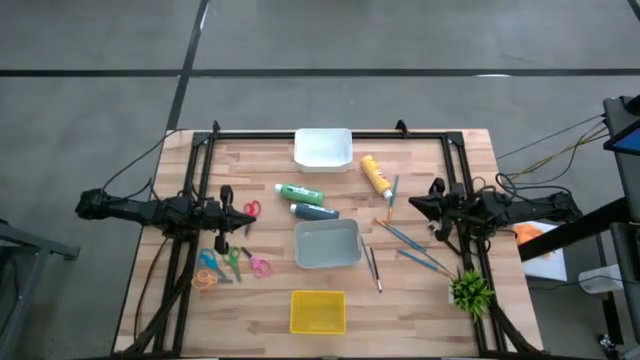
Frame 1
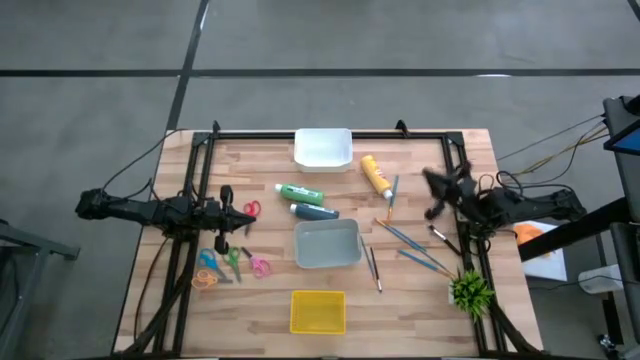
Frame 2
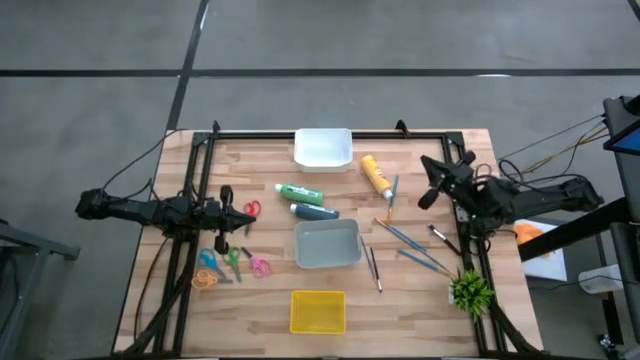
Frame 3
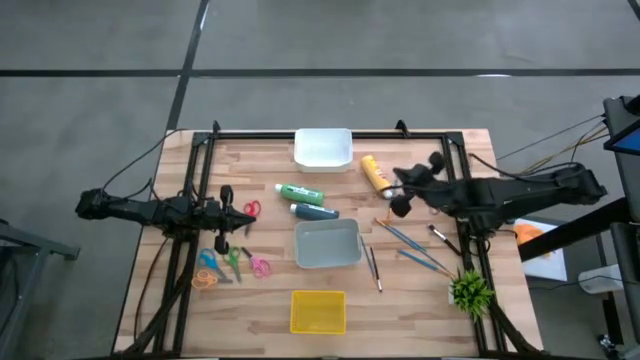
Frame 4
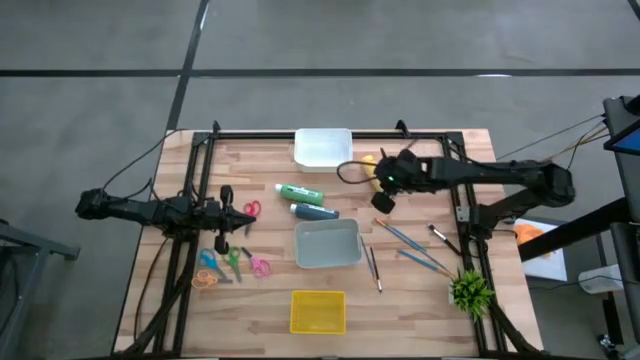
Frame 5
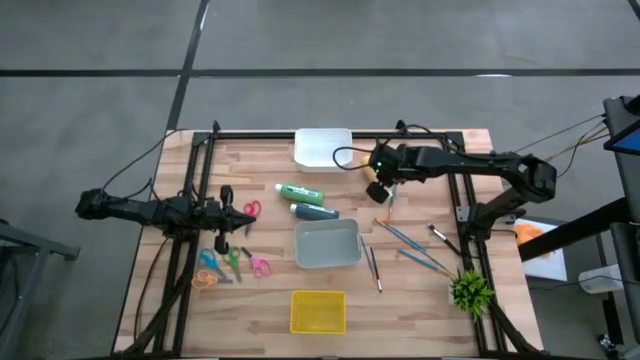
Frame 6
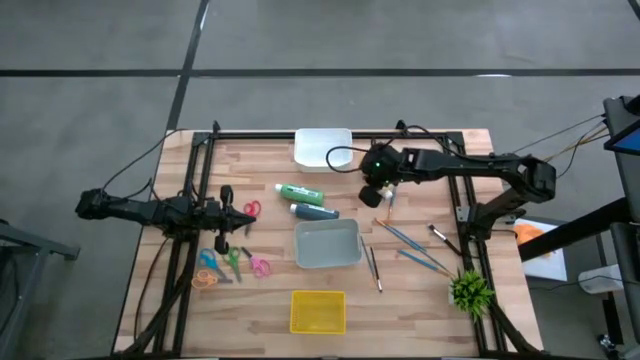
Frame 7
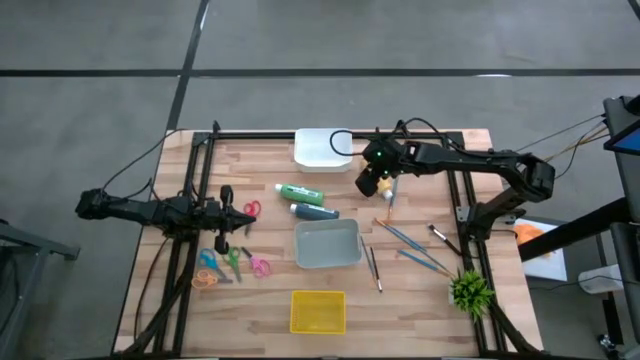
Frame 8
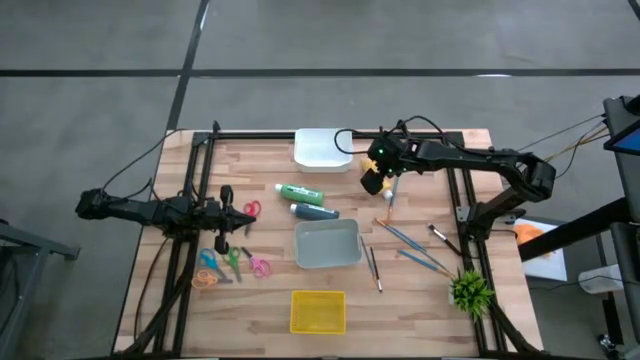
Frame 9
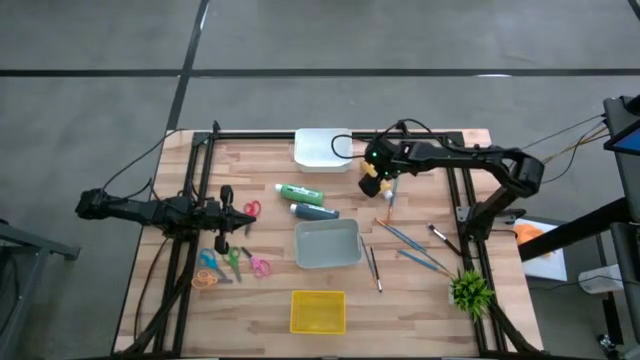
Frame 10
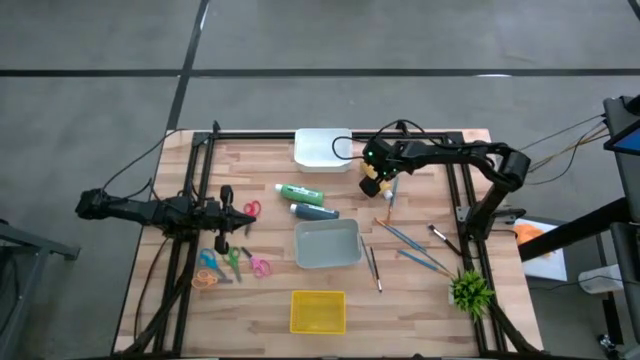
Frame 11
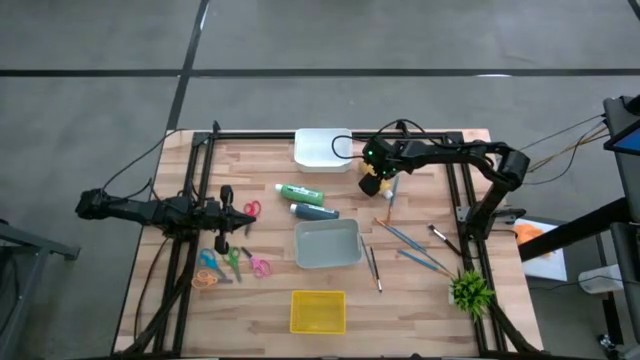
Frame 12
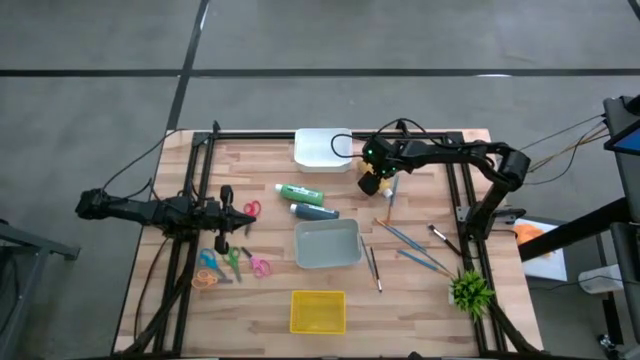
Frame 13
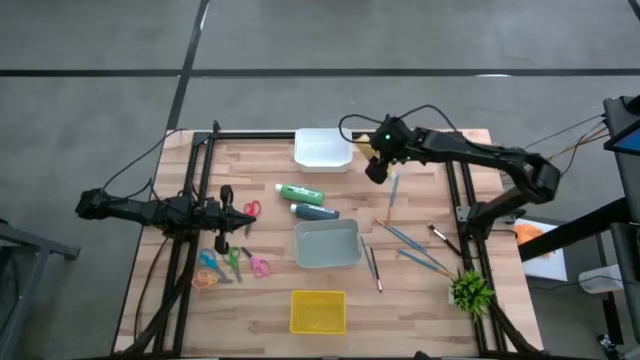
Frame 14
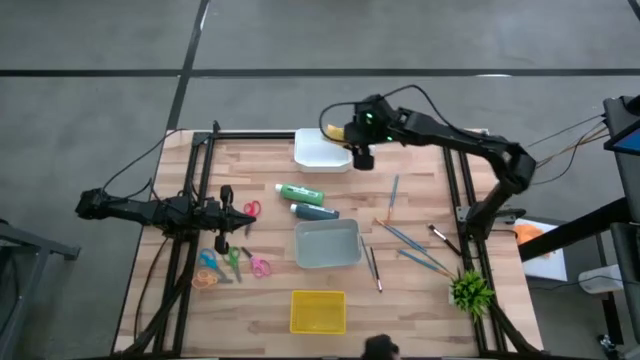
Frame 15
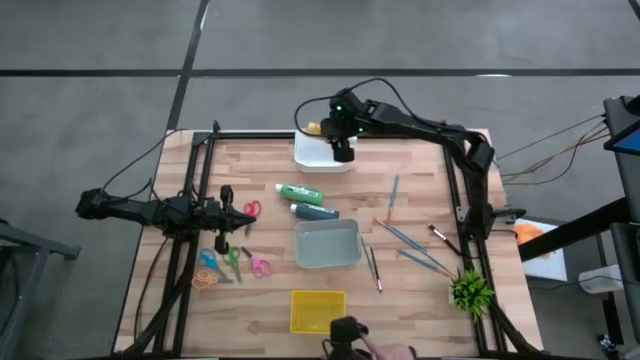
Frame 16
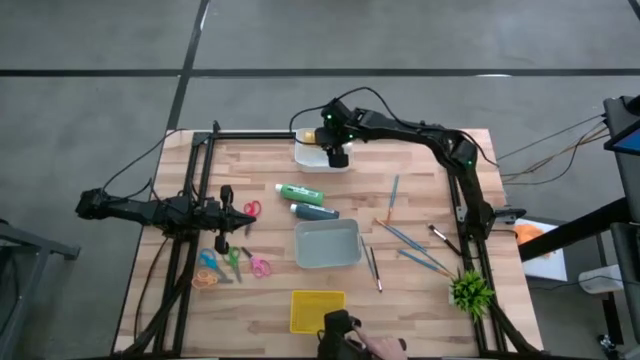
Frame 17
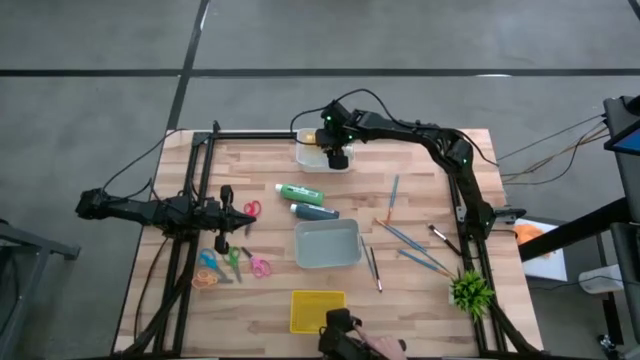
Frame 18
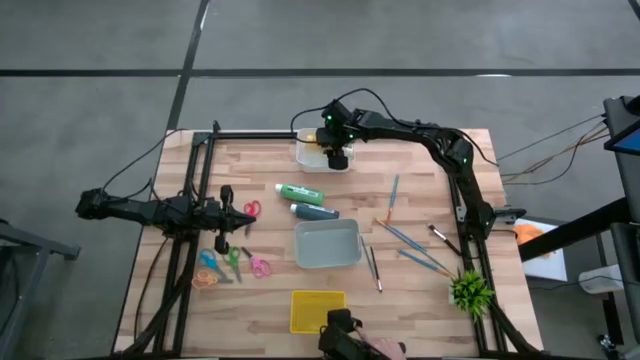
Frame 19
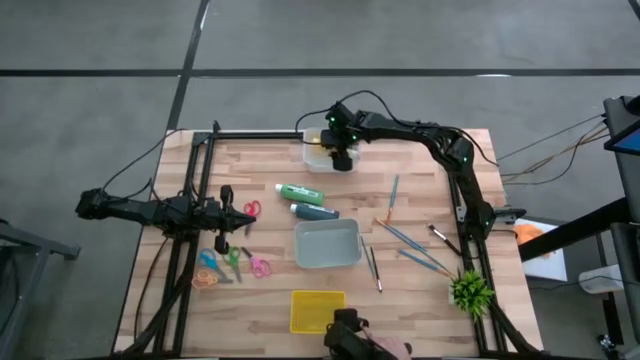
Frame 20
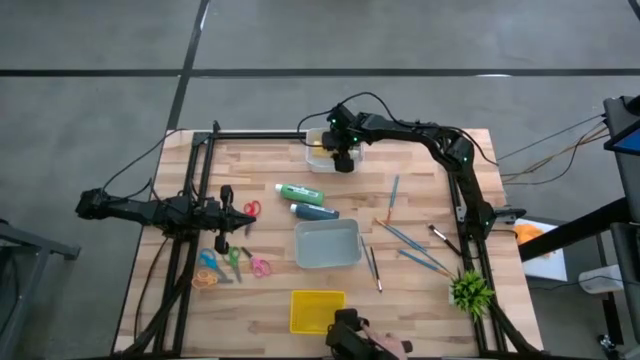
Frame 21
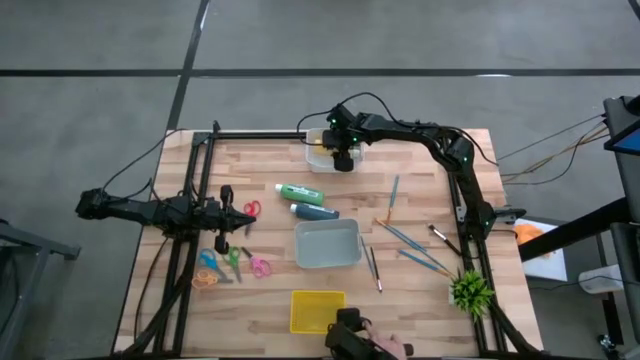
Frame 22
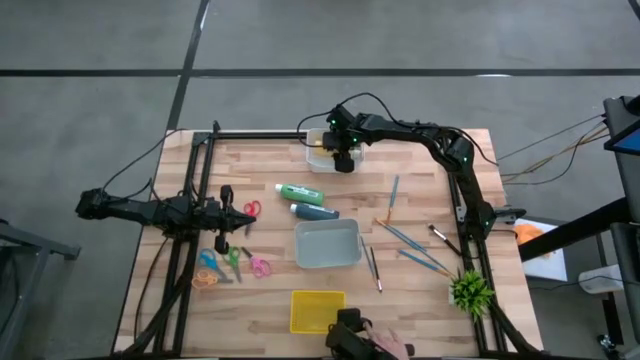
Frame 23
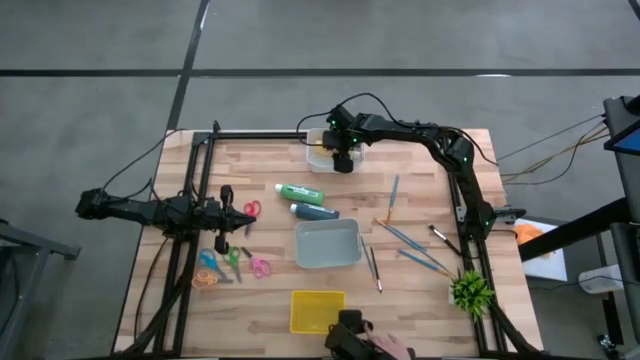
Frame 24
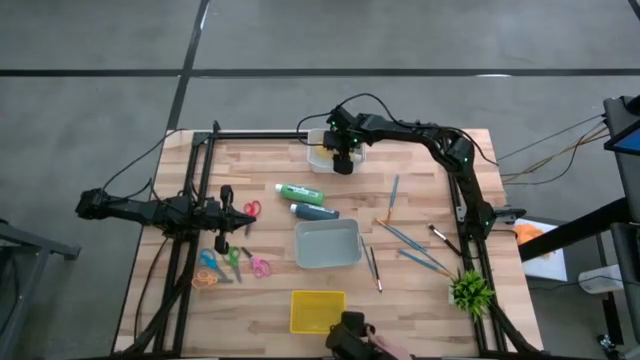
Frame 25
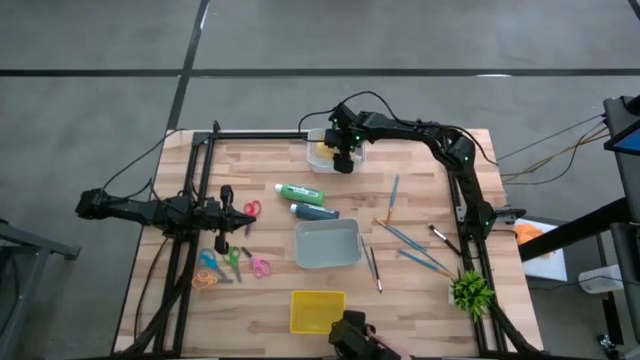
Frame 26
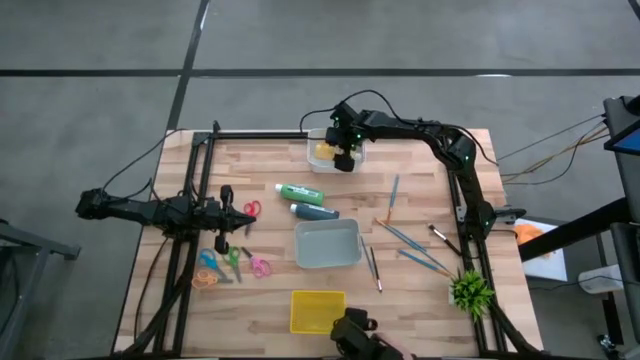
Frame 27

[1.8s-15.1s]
Task: Pick & Place Paint Supplies
Put the yellow paint bottle into the white bin

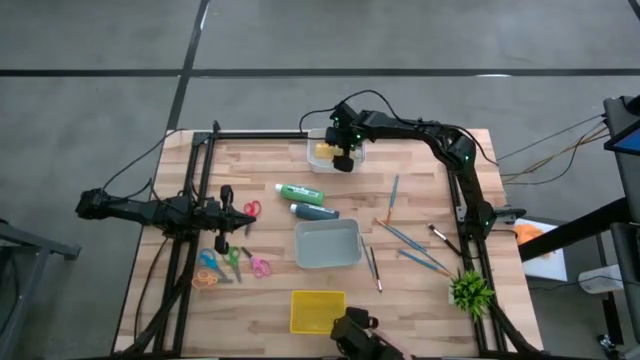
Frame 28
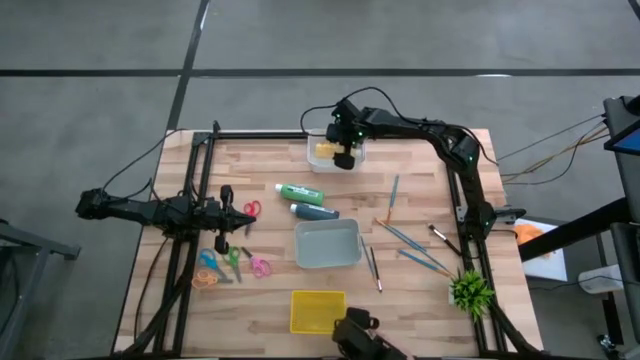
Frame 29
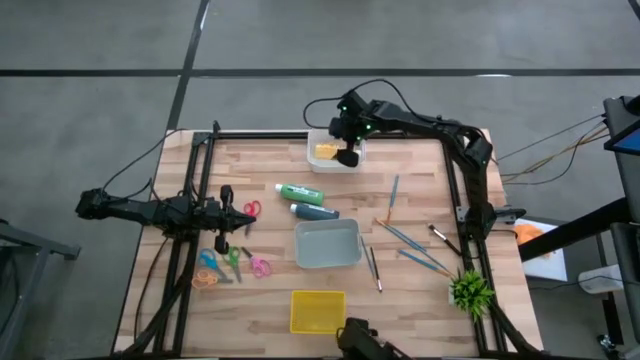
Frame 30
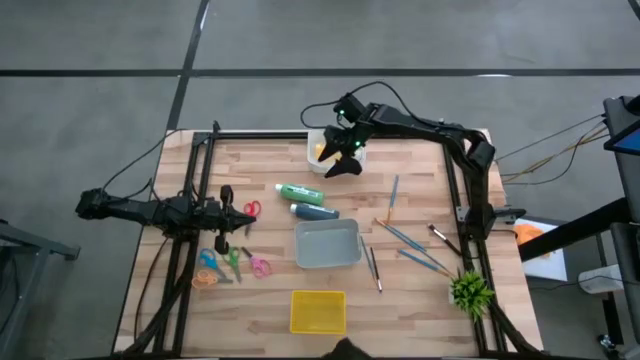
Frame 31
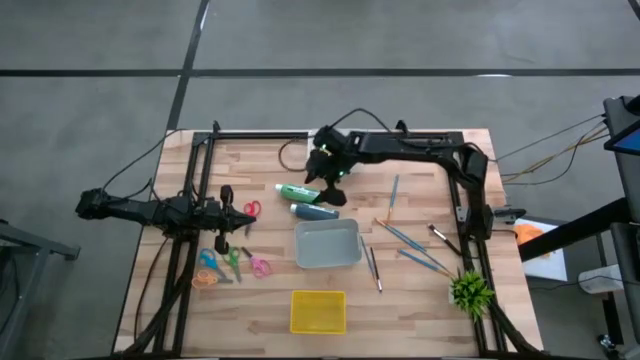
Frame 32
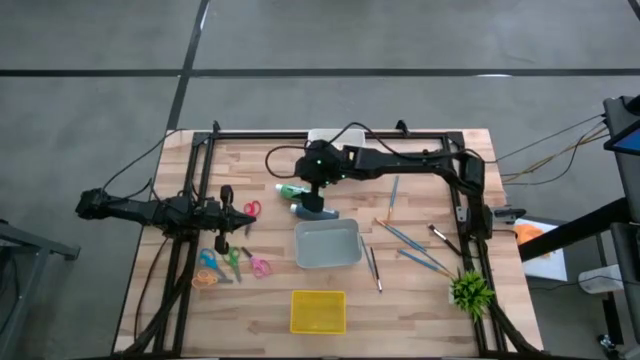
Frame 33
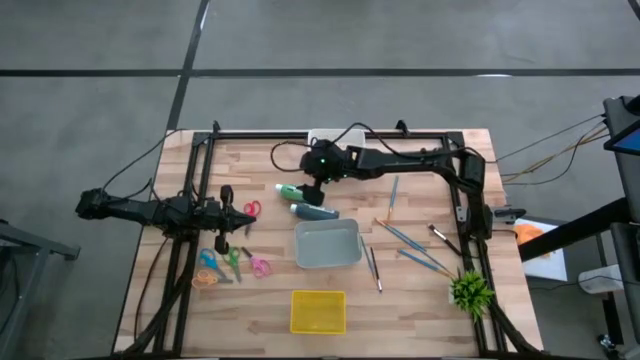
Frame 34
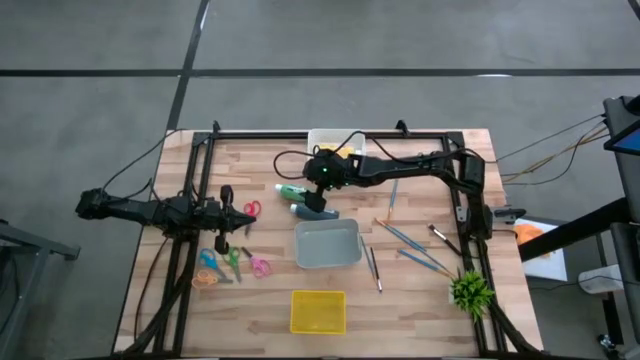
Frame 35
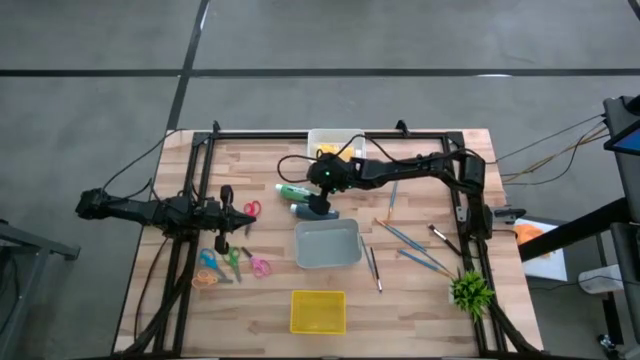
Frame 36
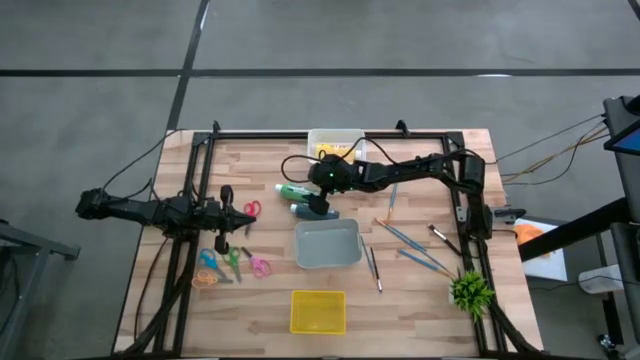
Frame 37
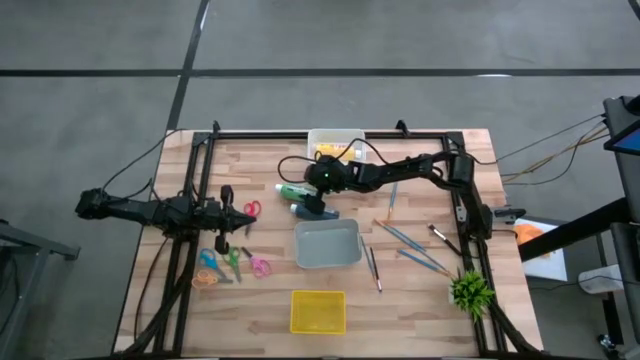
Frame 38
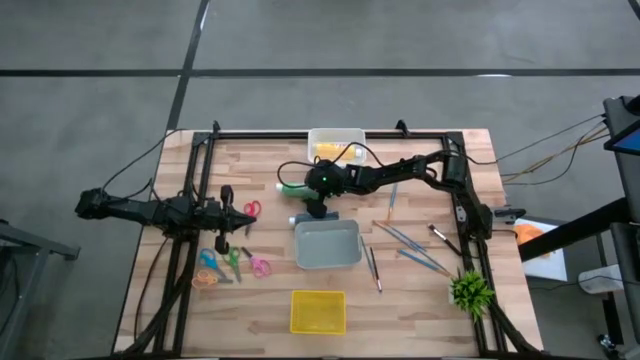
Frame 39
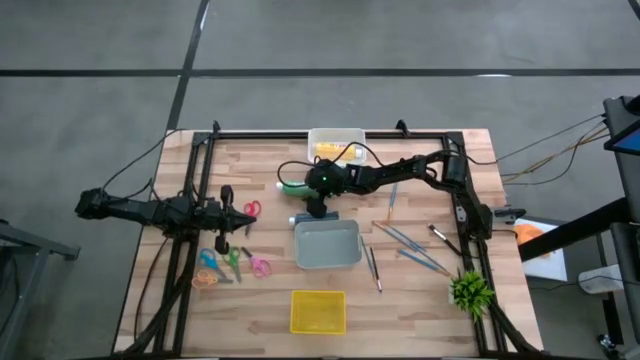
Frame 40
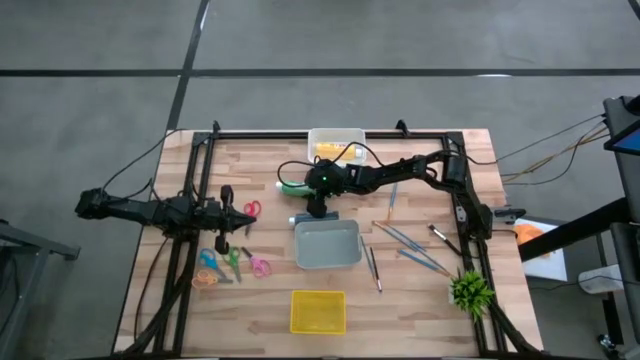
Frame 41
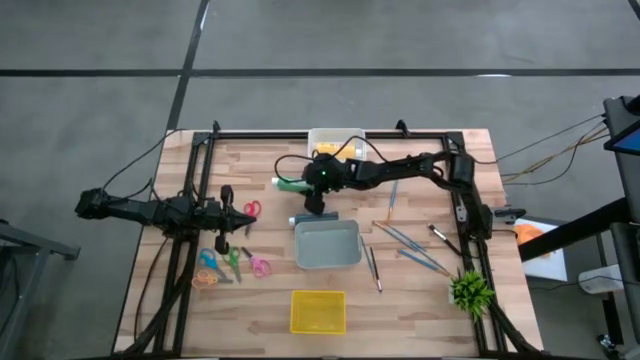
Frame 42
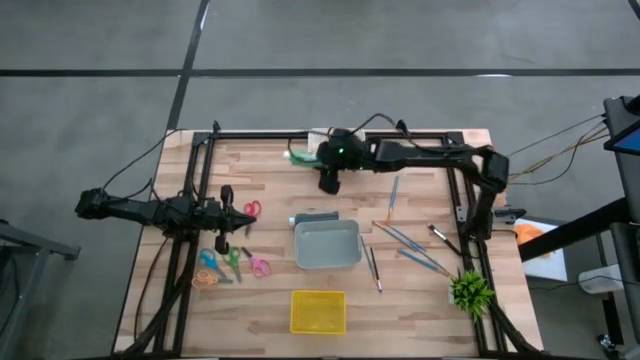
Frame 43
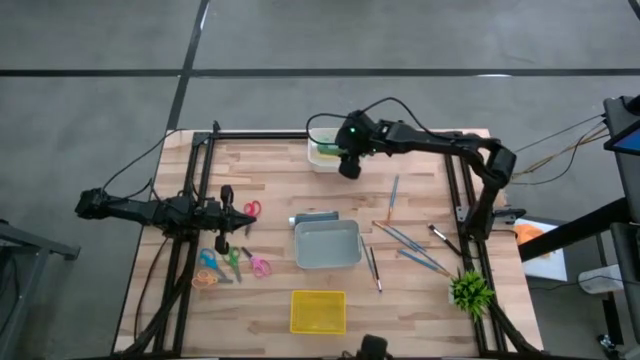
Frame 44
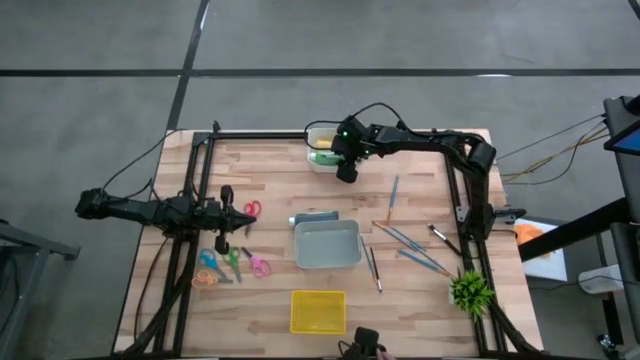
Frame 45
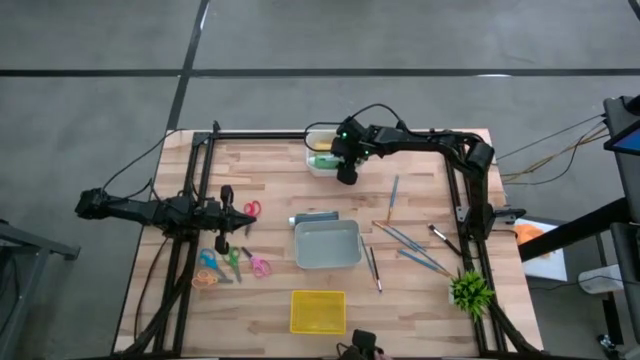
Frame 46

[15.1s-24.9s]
Put the green paint bottle into the white bin
